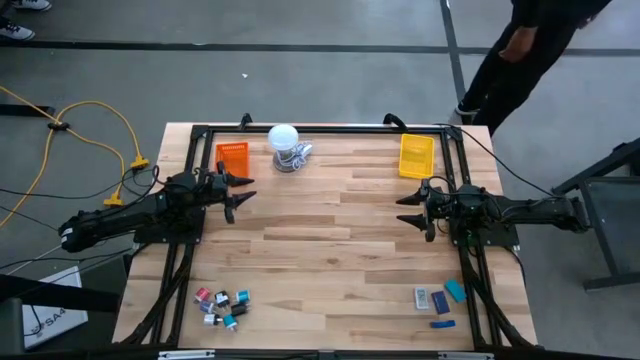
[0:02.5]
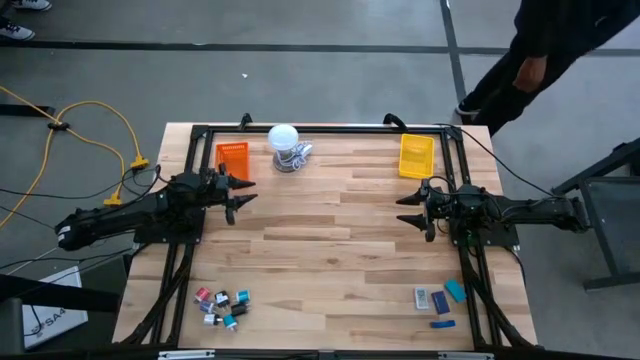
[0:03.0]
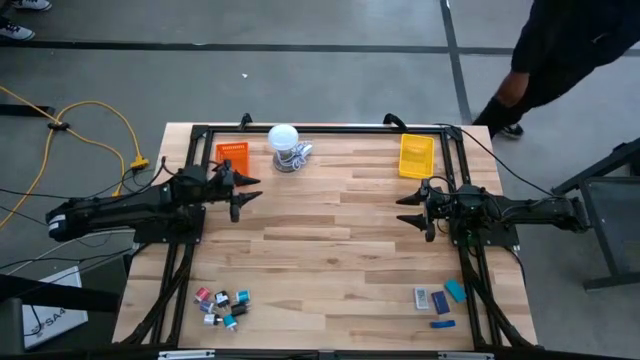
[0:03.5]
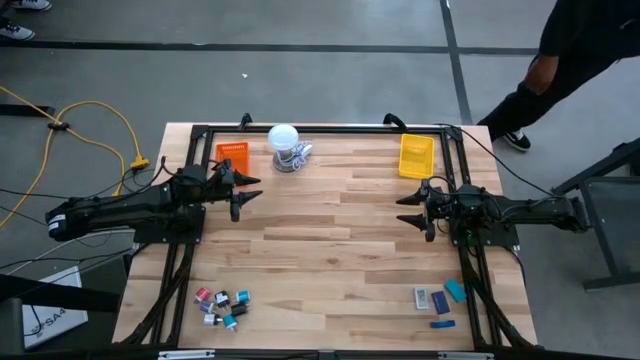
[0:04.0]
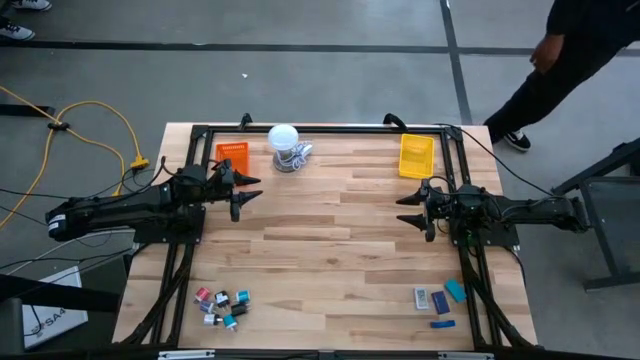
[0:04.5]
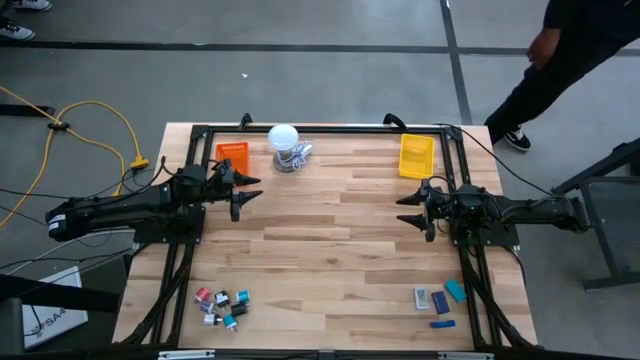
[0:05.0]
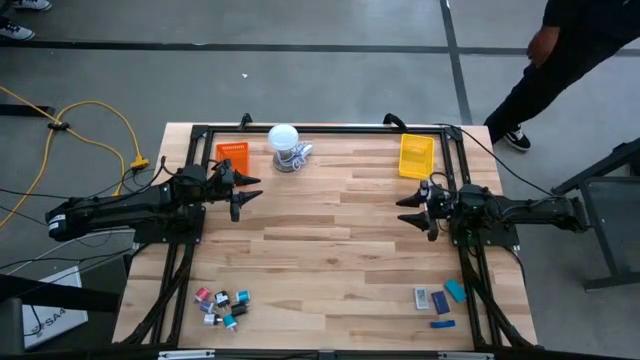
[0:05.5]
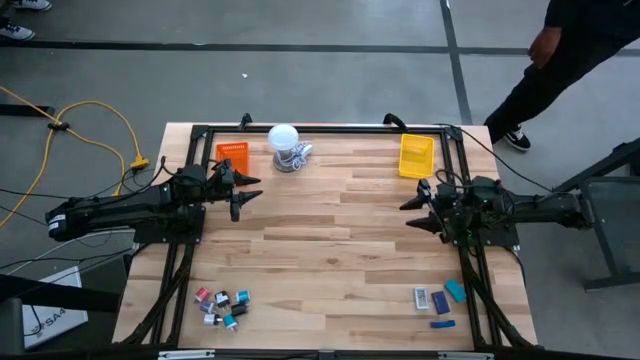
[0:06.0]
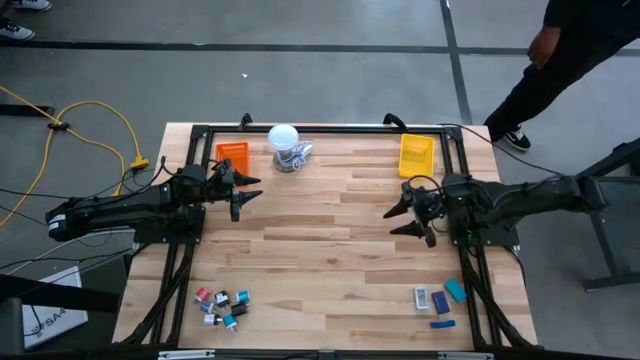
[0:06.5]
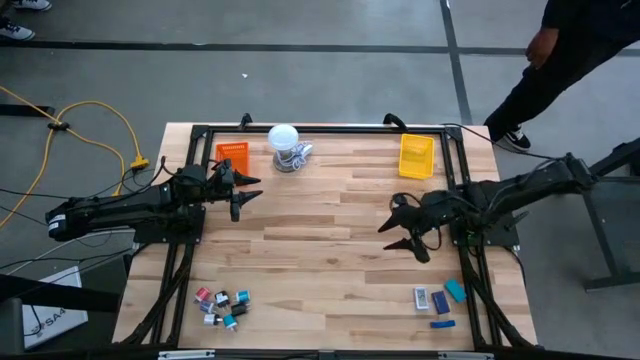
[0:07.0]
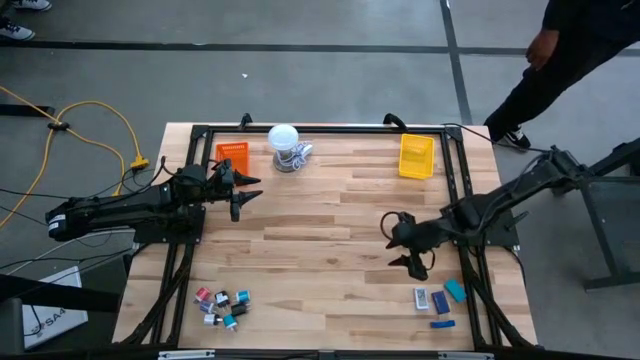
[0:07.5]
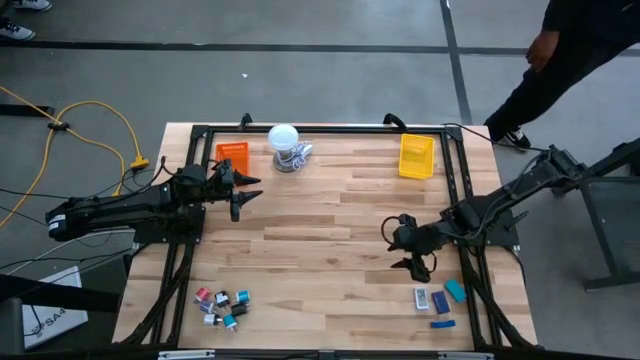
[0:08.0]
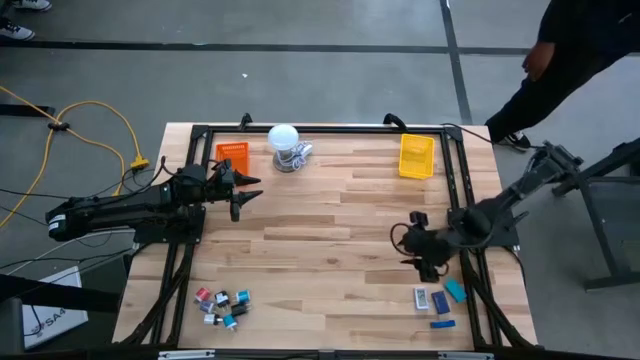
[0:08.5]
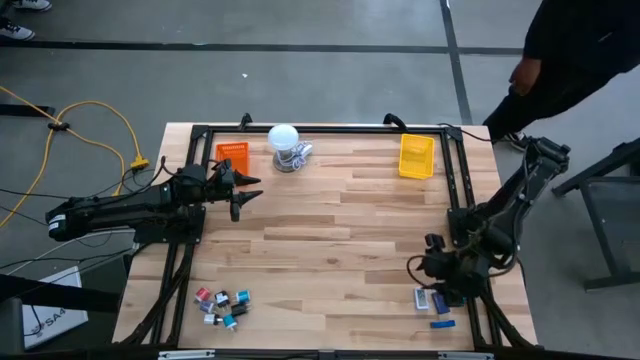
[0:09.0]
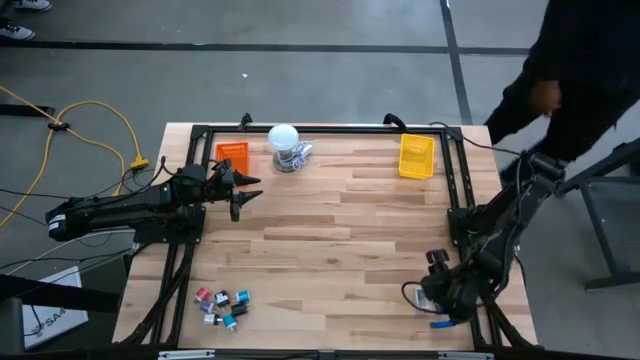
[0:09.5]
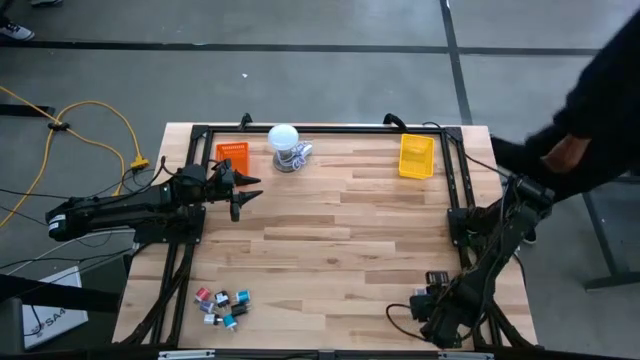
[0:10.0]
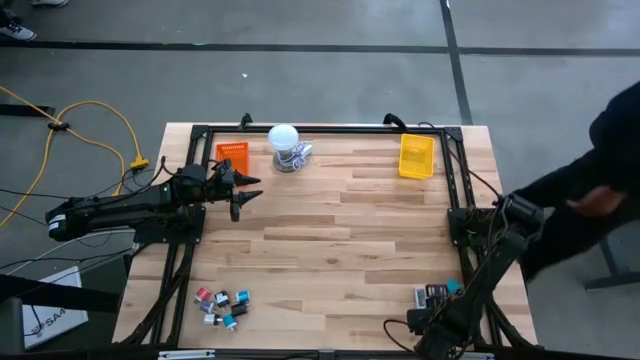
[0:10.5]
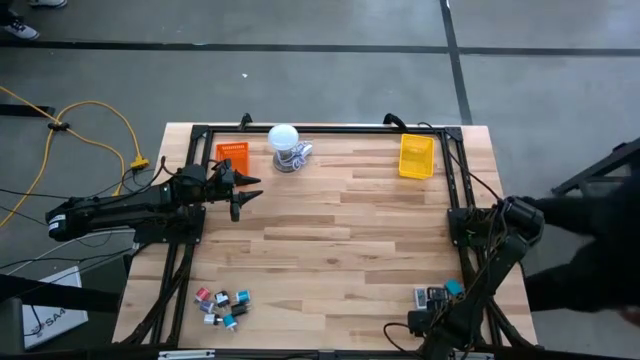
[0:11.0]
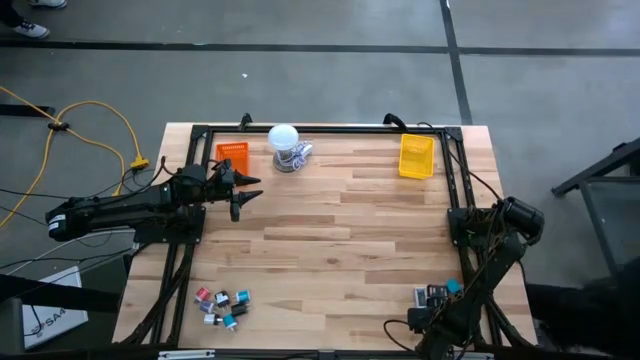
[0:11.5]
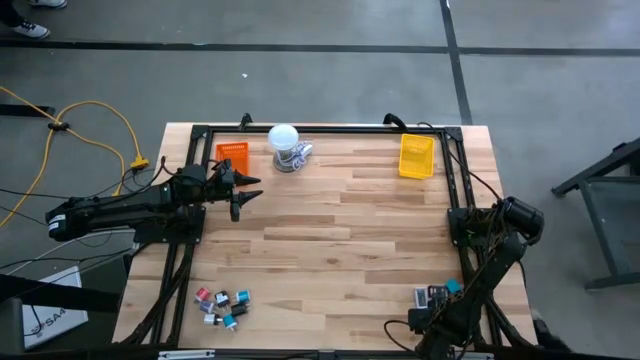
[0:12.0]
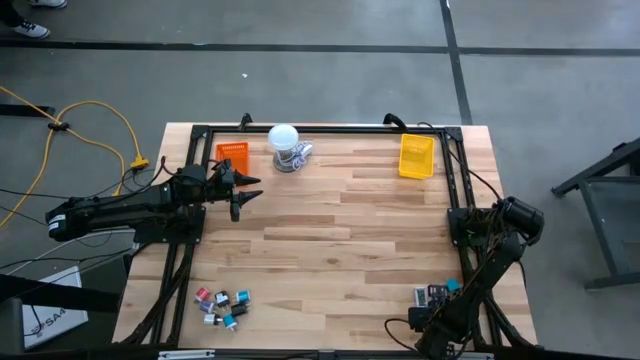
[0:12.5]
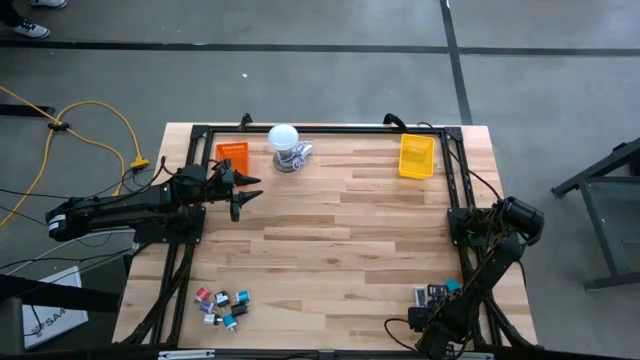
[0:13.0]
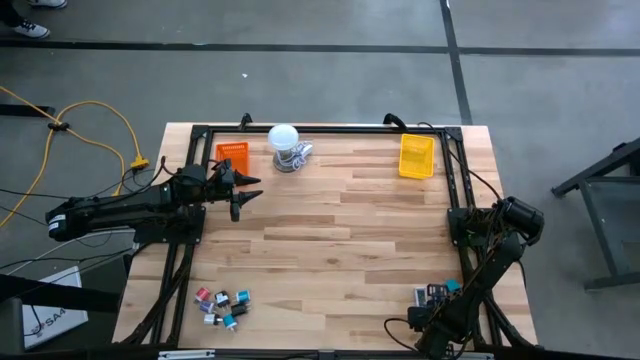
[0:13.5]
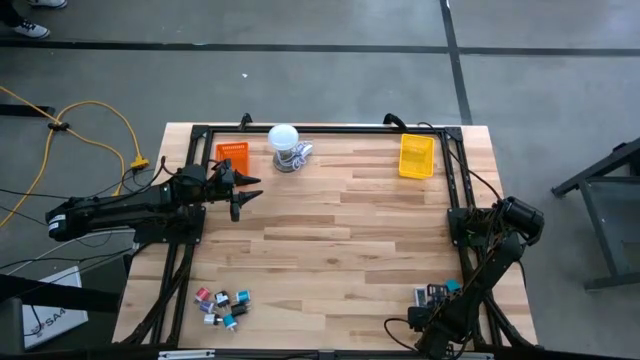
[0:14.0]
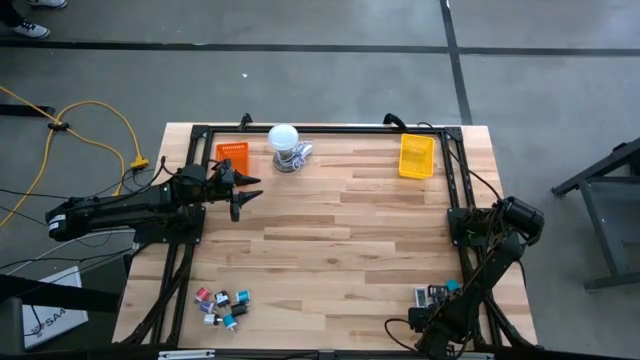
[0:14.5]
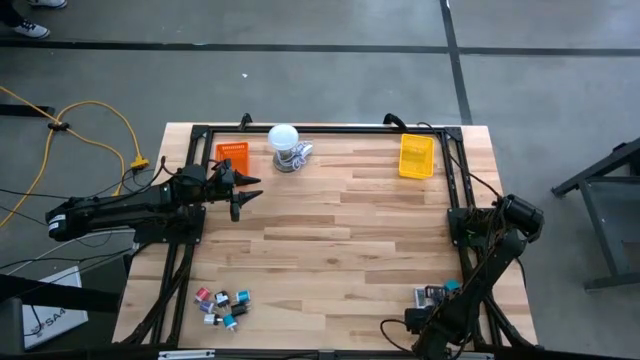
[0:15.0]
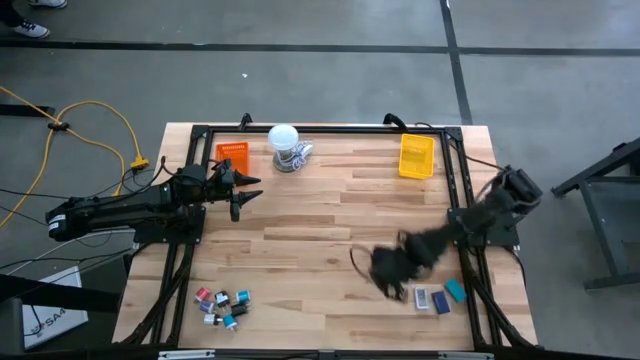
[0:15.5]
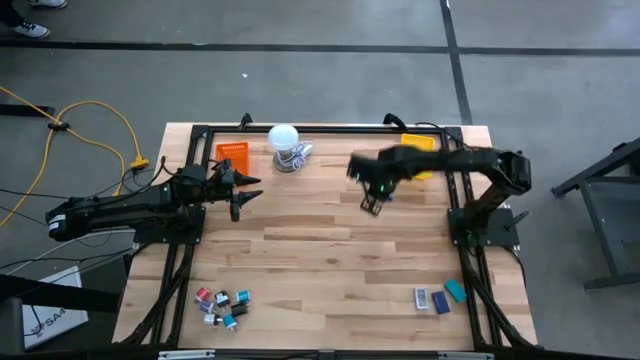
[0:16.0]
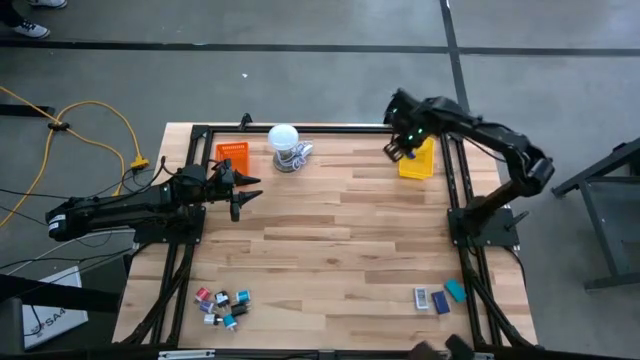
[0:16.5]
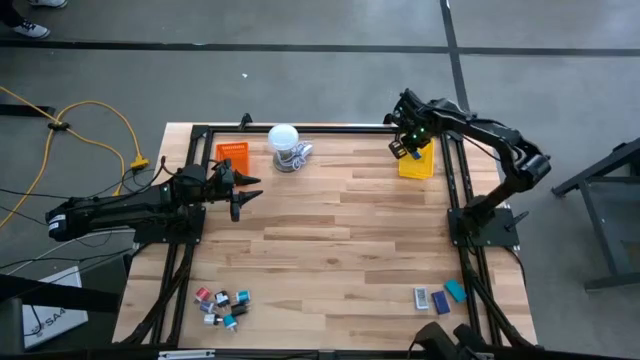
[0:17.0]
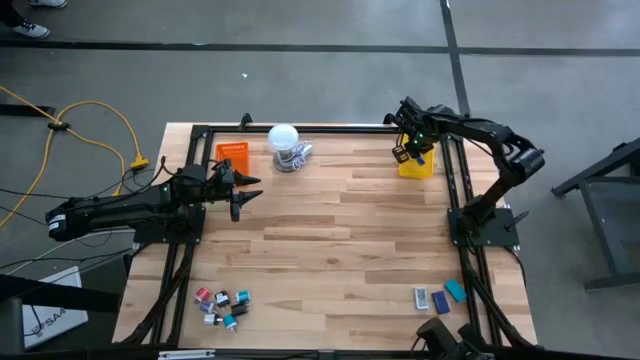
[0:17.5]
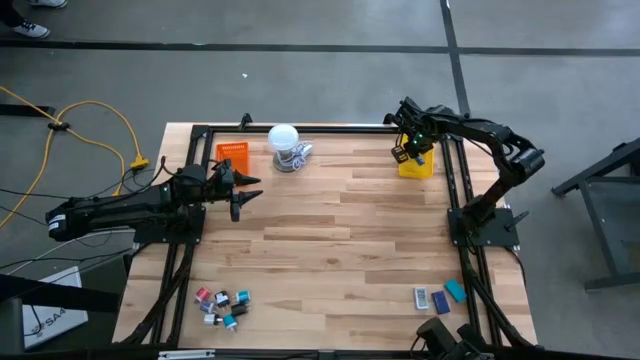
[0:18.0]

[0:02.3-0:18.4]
Task: Pick & Place Office items
Put the blue digital timer into the yellow basket
